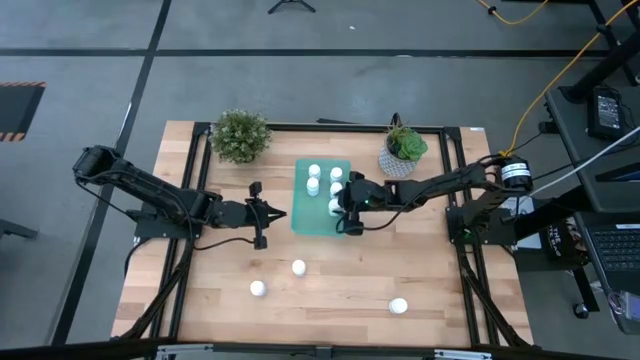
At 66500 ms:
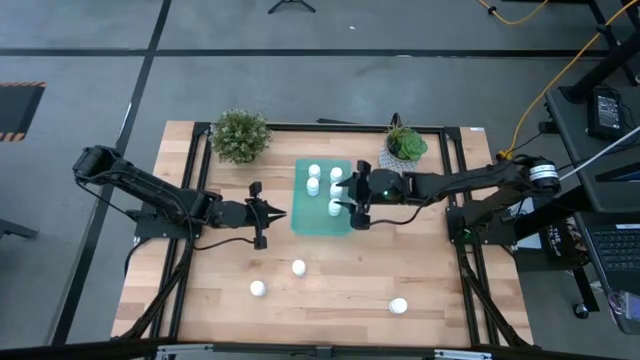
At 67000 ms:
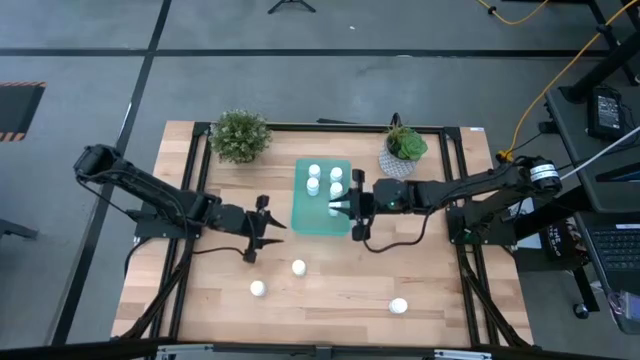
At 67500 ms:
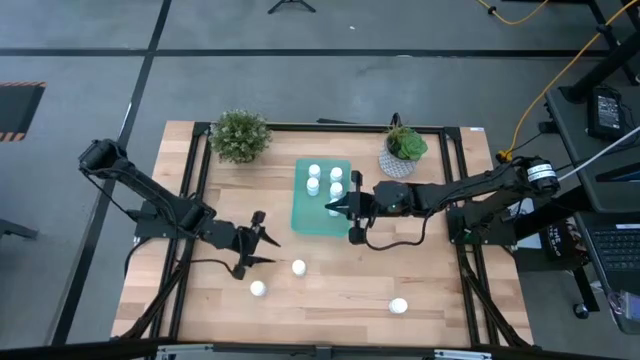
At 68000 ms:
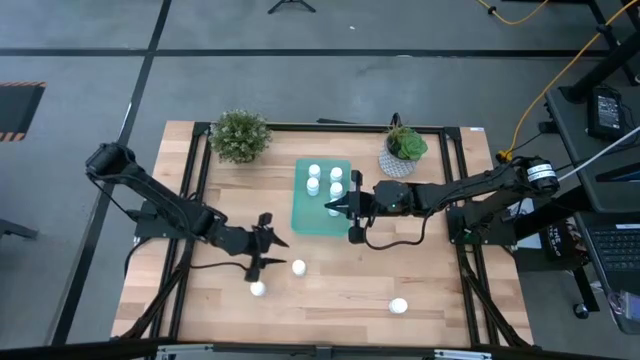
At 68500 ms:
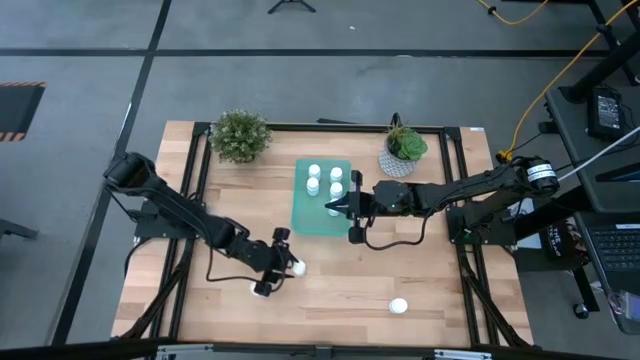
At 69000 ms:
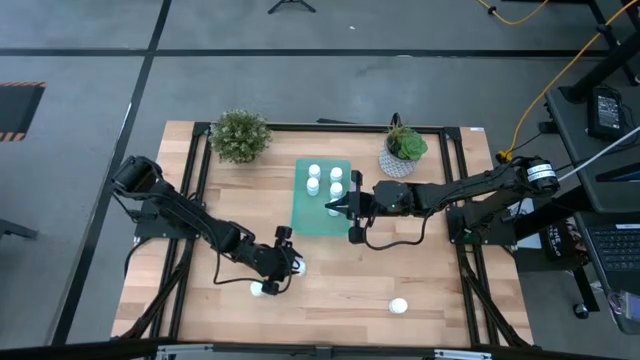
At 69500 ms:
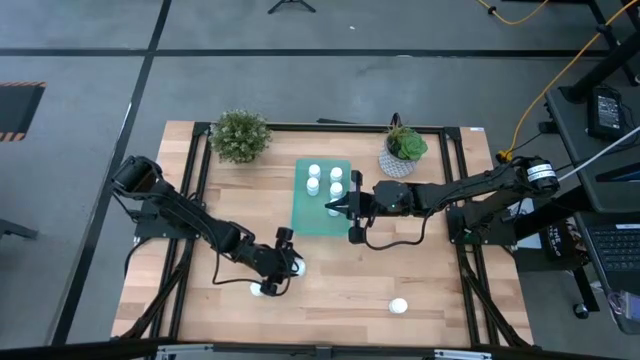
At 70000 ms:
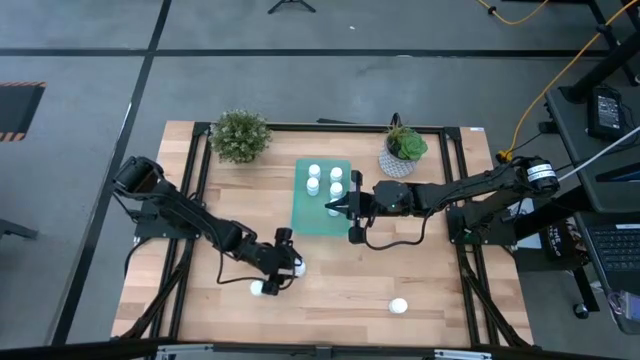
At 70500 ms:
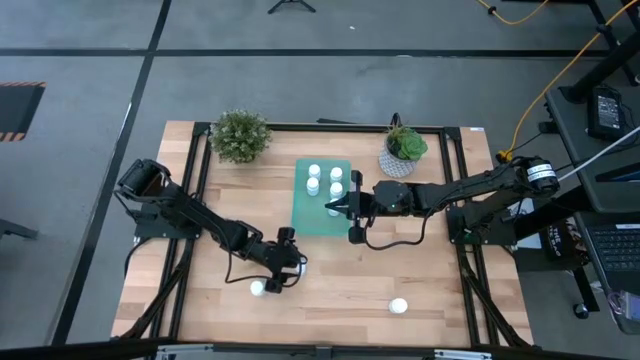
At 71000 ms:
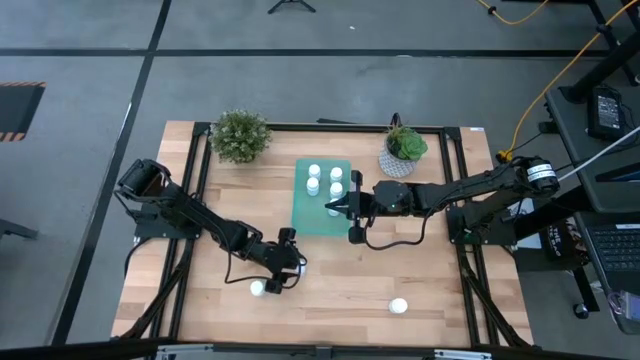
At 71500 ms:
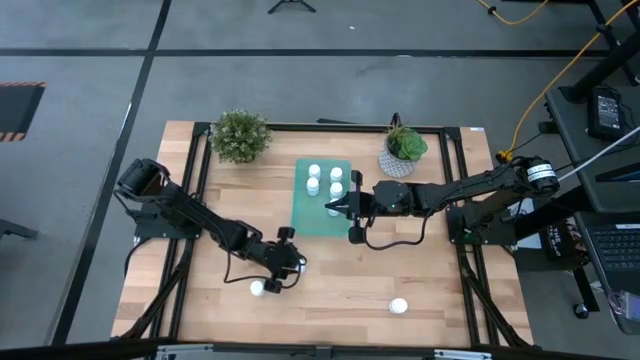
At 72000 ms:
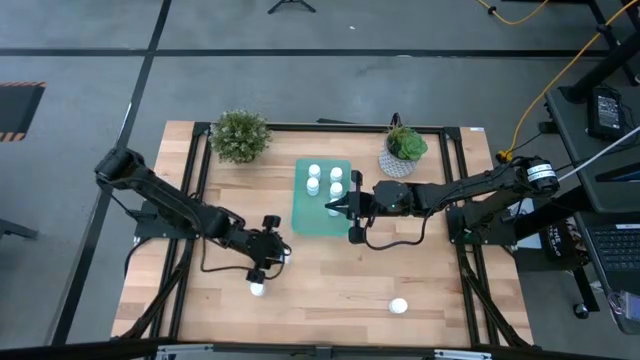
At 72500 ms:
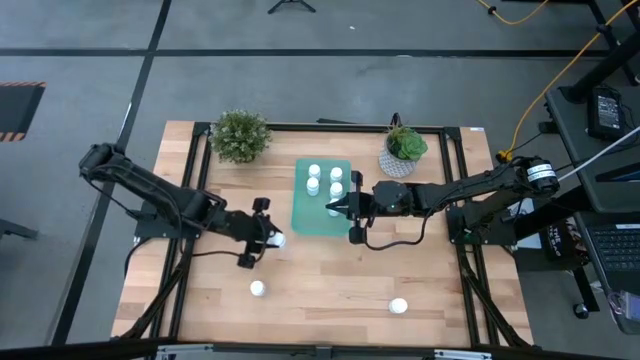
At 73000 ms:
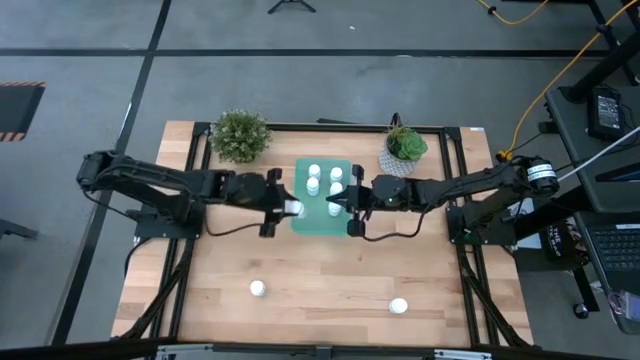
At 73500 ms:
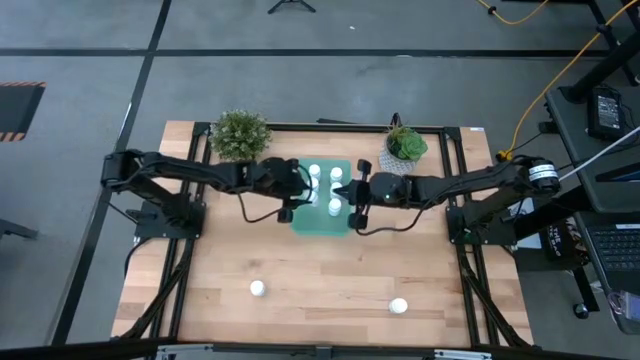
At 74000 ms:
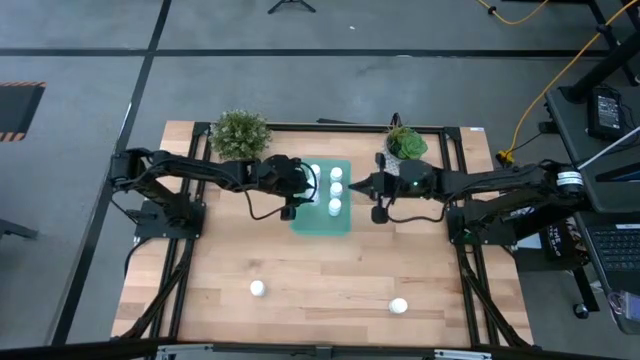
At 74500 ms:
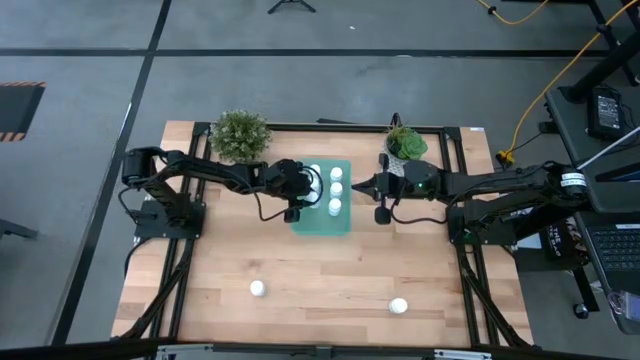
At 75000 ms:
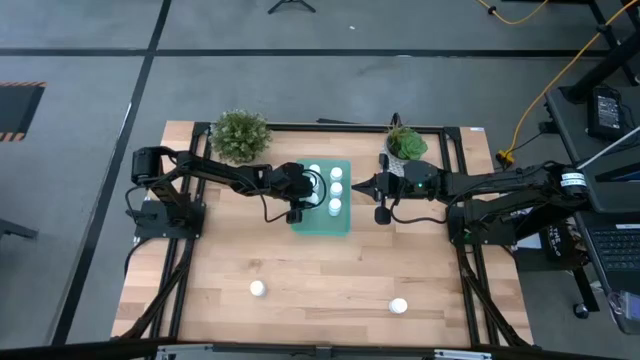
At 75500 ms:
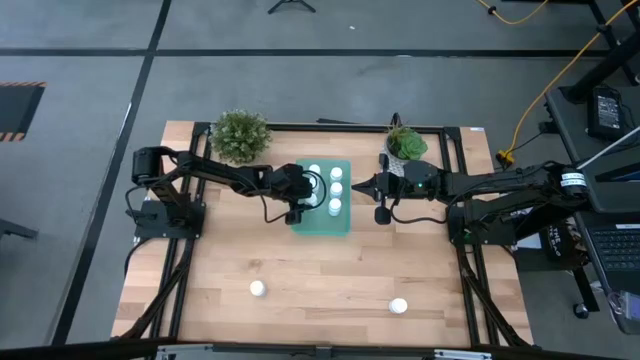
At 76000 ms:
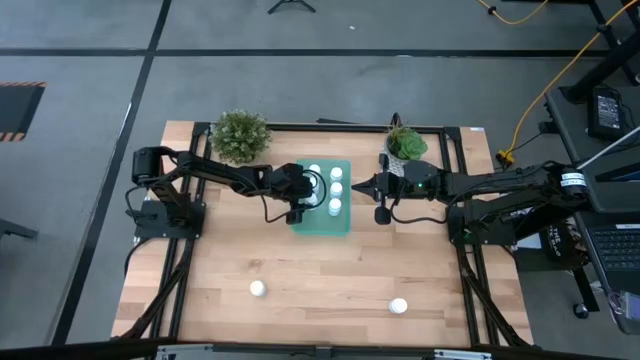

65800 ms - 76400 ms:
Task: Pick and place pill bottles into a basket
Put the white pill bottle into the green bin

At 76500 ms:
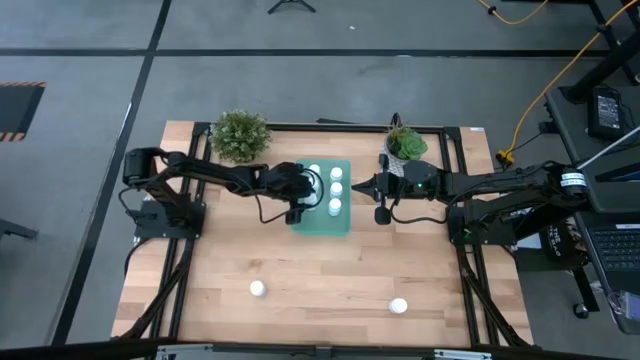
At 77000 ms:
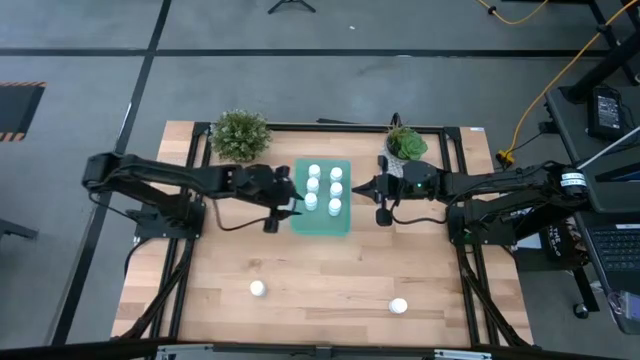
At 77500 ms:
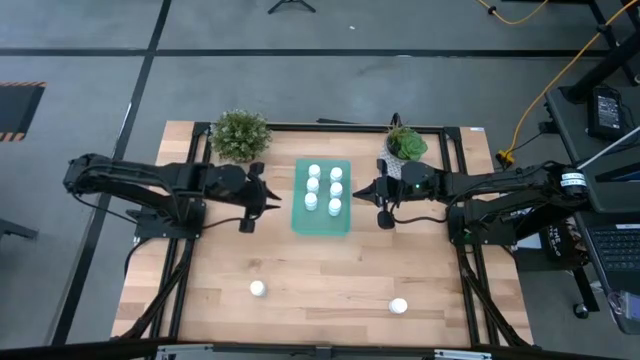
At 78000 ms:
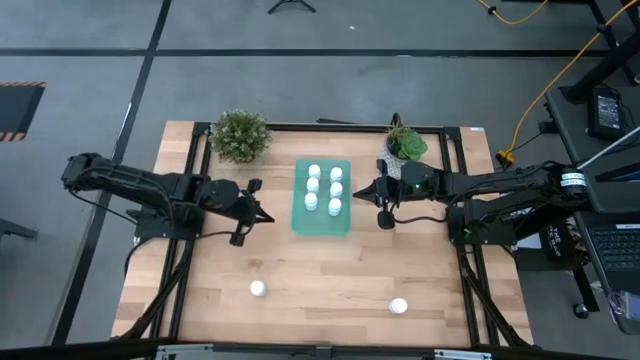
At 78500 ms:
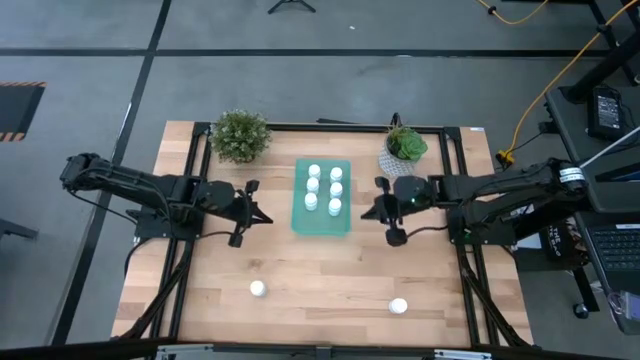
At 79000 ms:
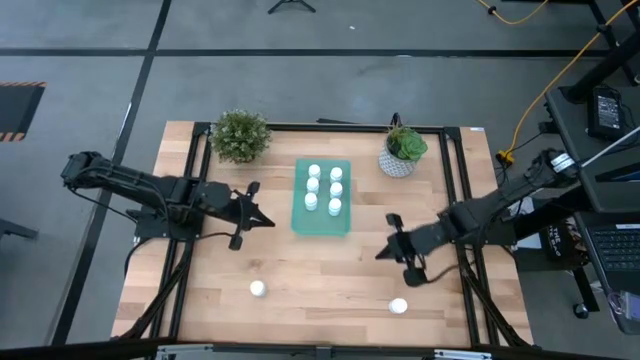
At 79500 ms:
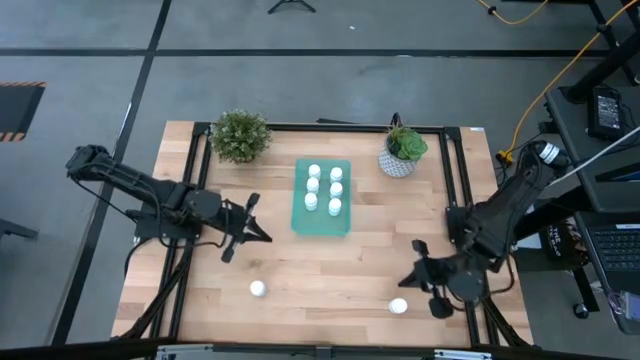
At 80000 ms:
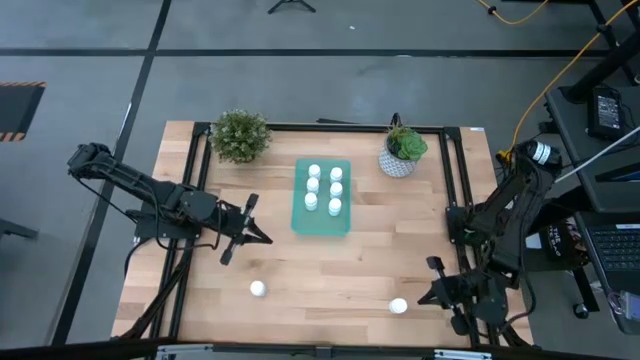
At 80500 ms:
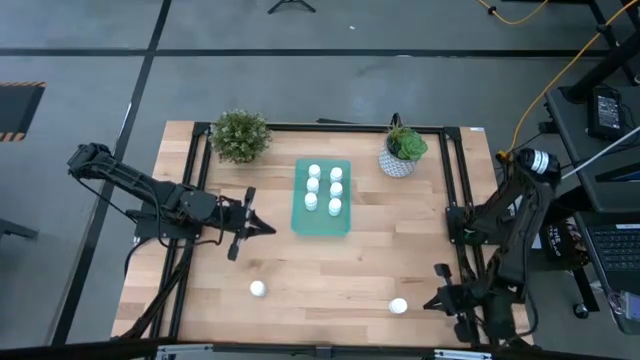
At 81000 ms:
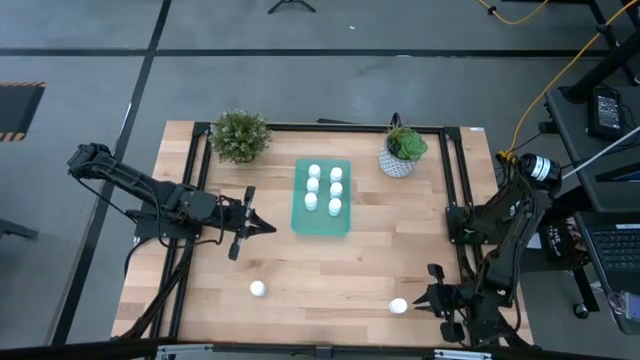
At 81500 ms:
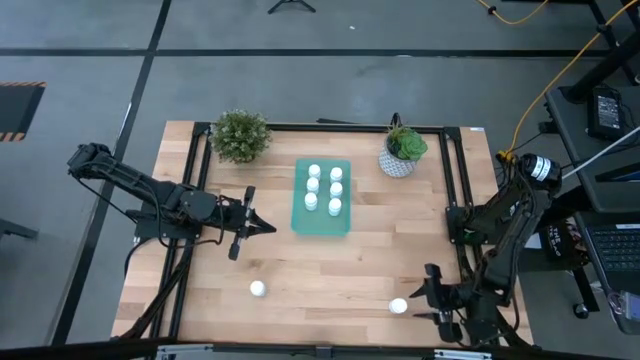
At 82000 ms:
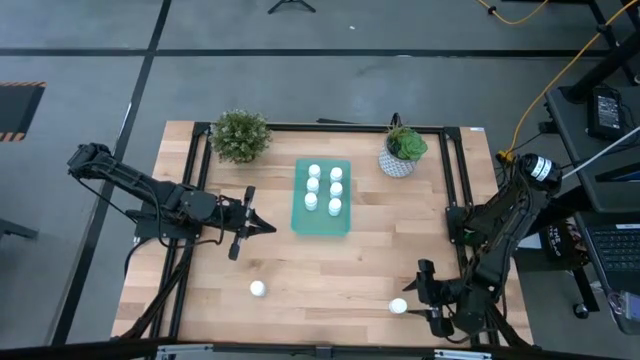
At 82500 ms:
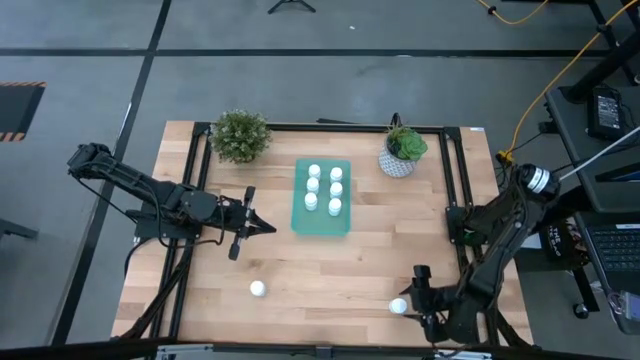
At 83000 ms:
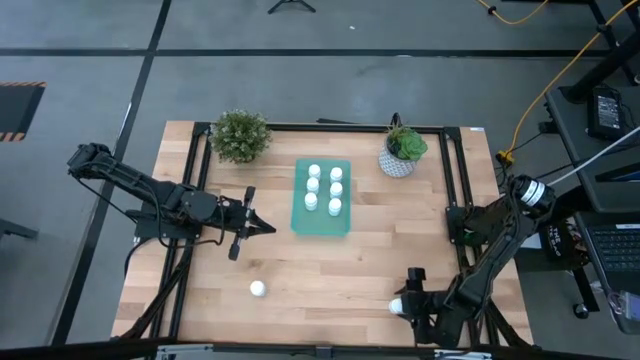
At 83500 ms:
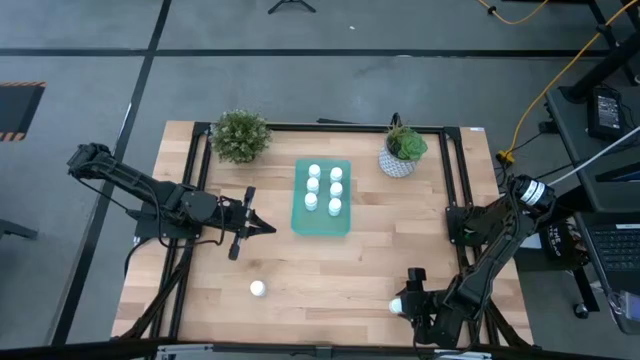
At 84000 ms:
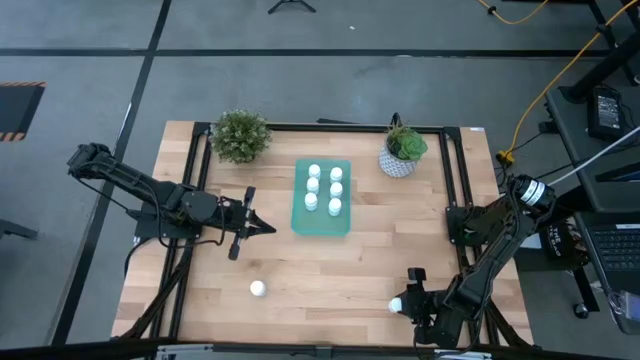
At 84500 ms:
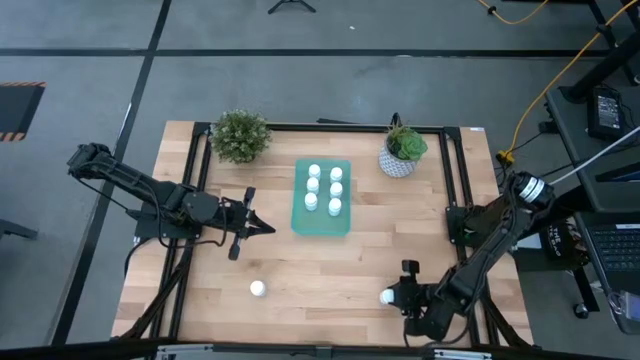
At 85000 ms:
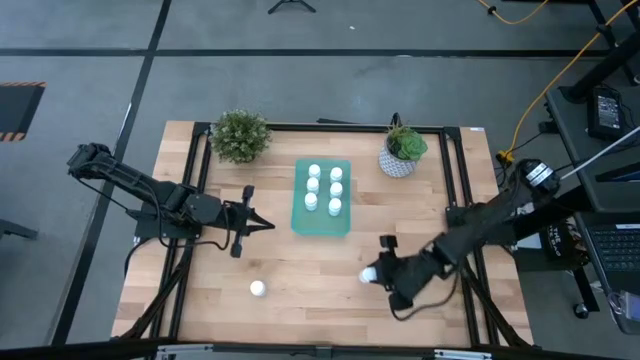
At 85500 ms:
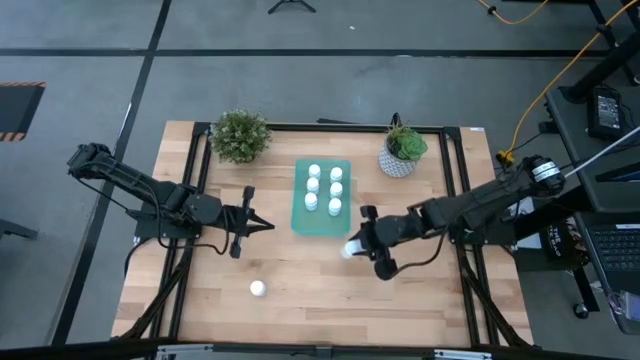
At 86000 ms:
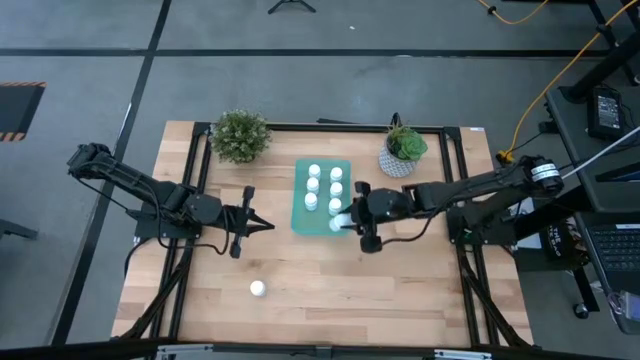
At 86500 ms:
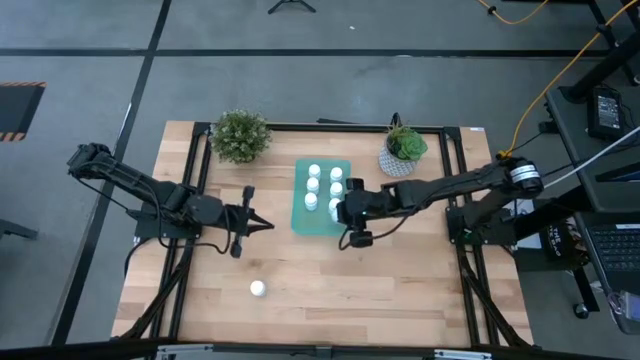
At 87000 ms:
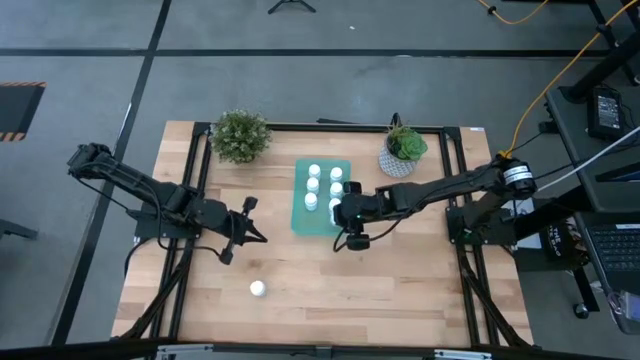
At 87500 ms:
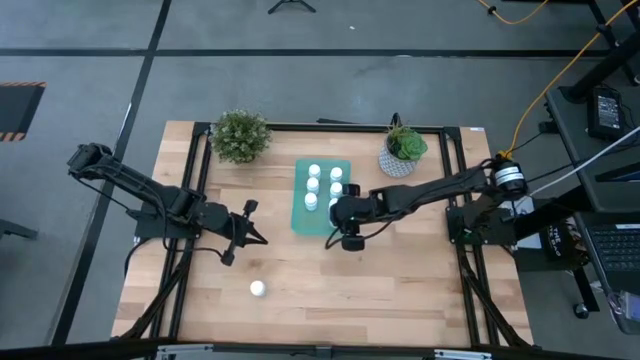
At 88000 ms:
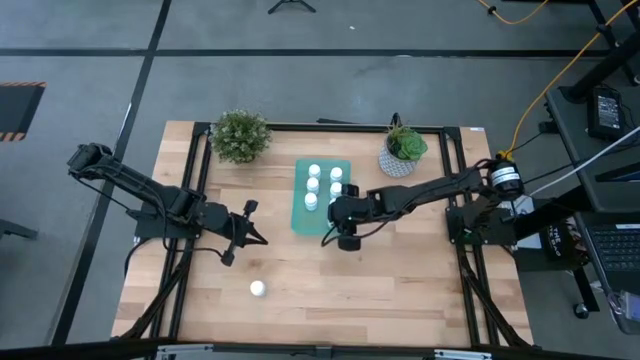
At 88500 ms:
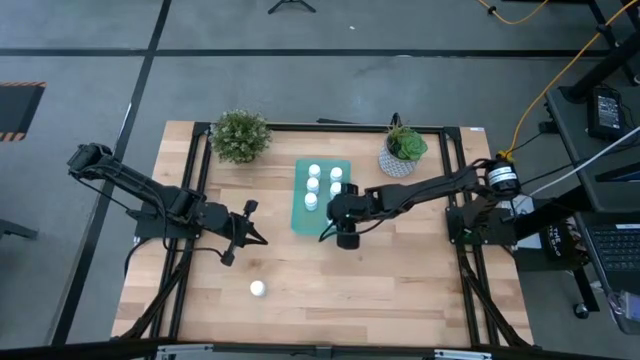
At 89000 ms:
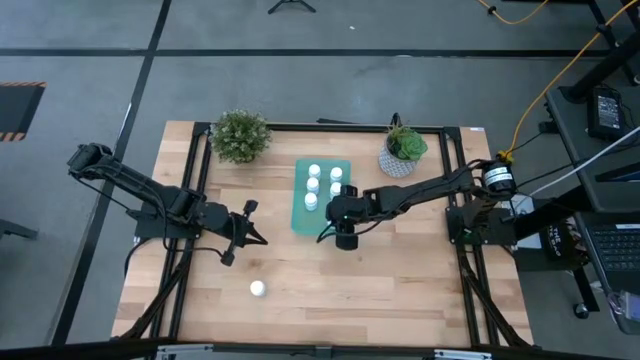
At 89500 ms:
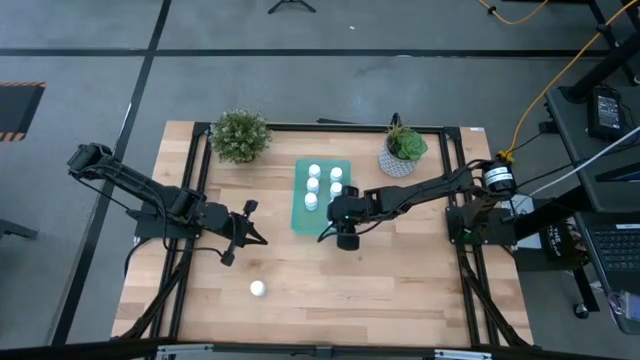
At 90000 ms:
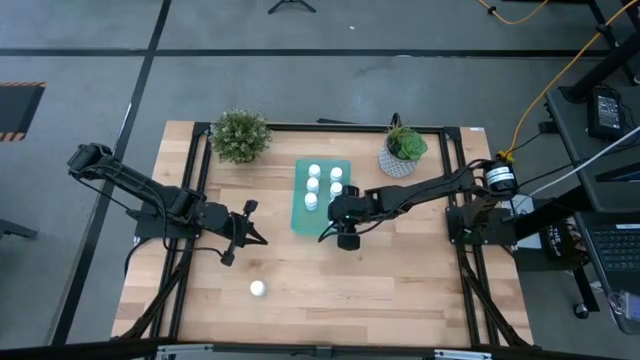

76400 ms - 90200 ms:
Put the white pill bottle into the green bin
